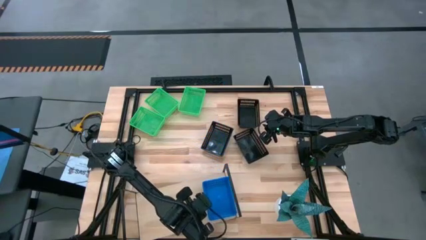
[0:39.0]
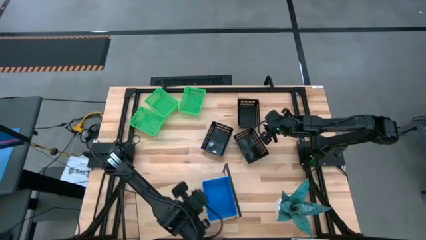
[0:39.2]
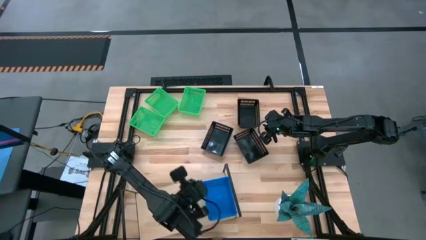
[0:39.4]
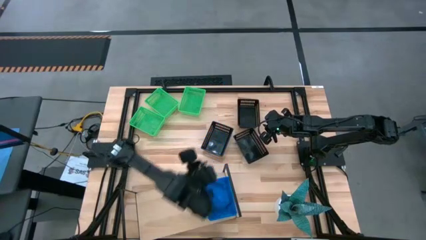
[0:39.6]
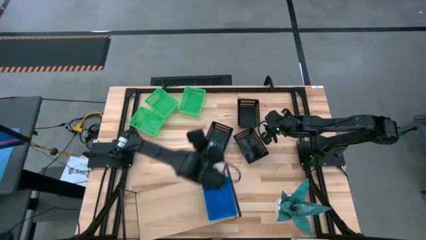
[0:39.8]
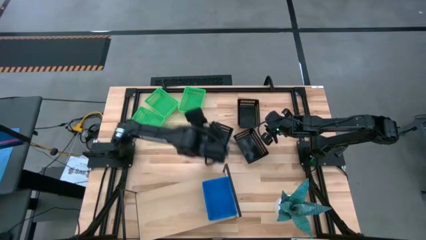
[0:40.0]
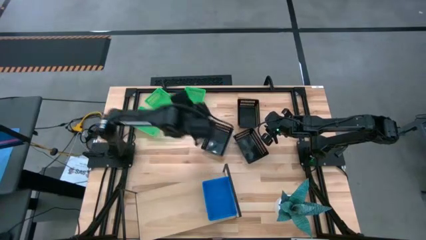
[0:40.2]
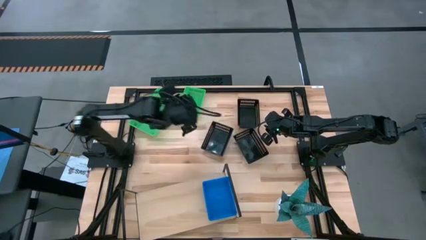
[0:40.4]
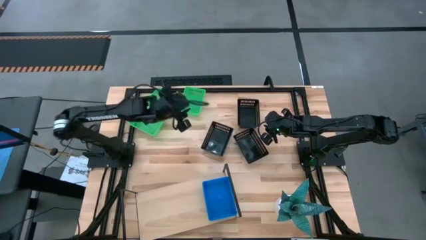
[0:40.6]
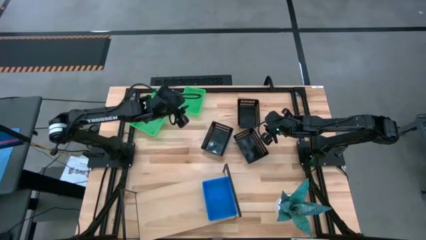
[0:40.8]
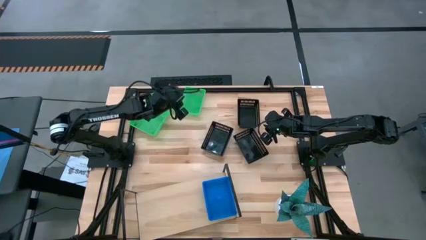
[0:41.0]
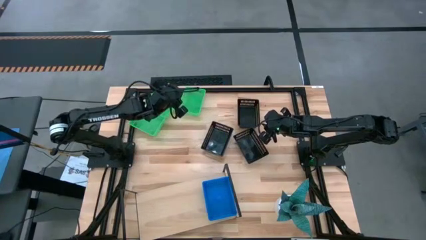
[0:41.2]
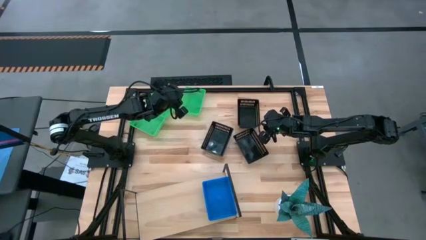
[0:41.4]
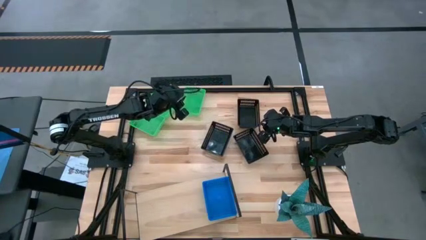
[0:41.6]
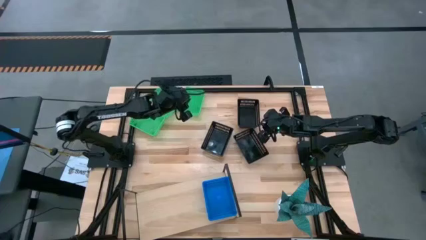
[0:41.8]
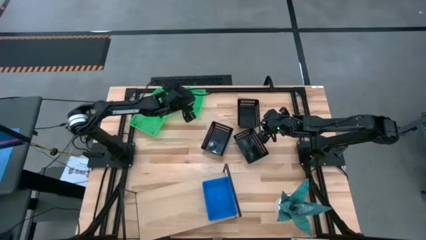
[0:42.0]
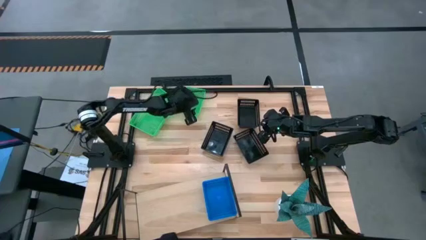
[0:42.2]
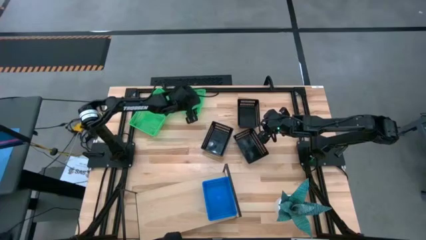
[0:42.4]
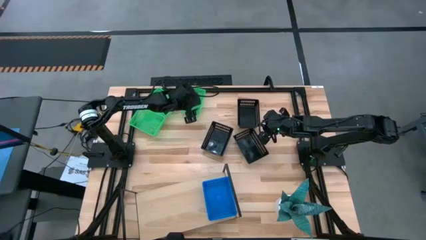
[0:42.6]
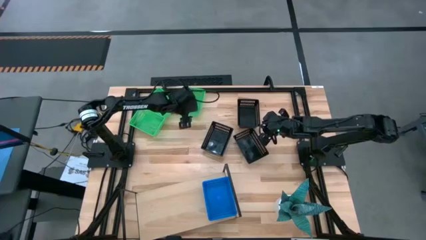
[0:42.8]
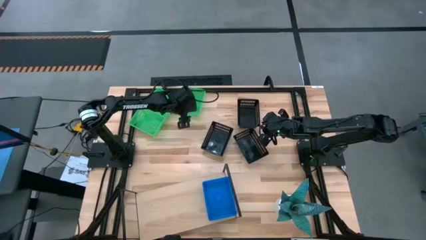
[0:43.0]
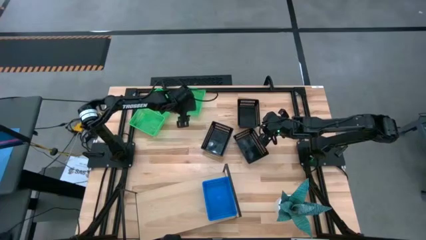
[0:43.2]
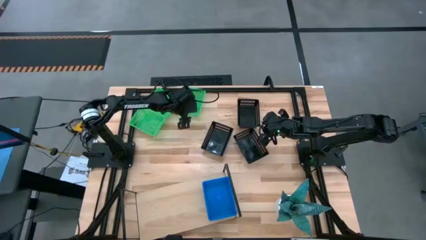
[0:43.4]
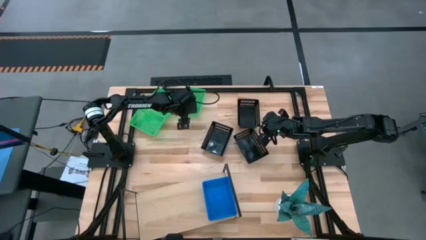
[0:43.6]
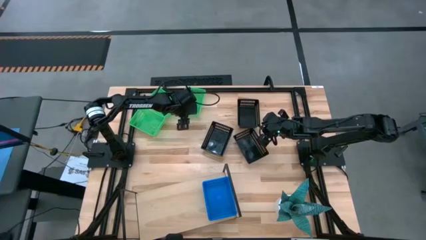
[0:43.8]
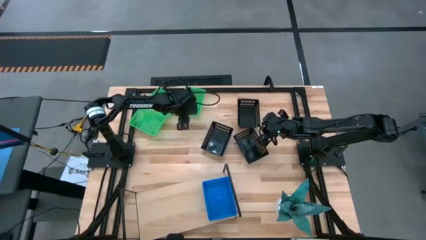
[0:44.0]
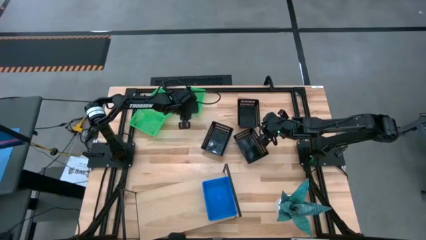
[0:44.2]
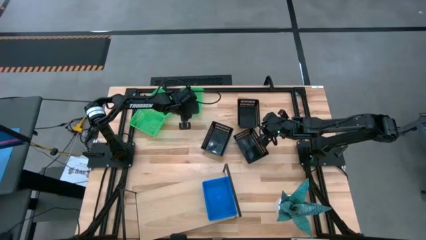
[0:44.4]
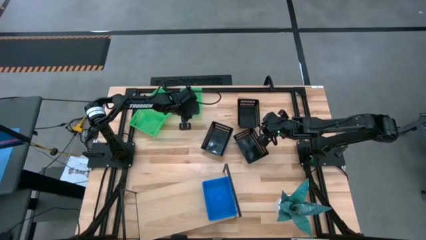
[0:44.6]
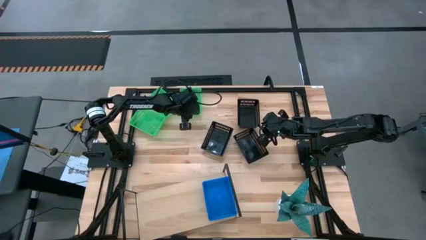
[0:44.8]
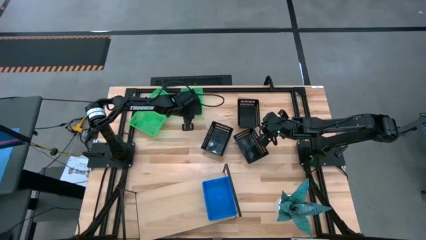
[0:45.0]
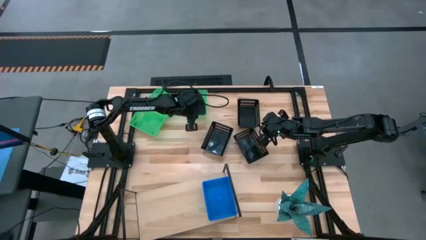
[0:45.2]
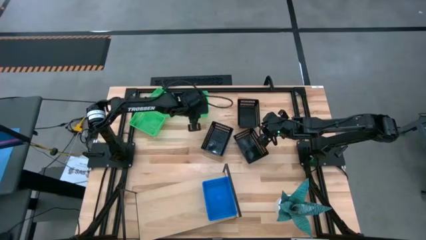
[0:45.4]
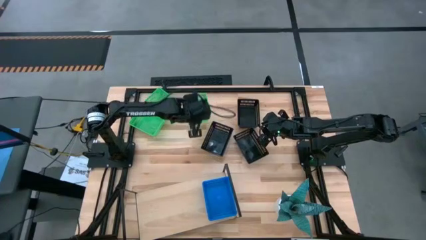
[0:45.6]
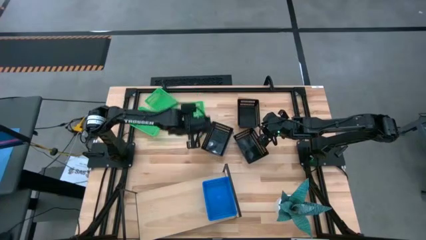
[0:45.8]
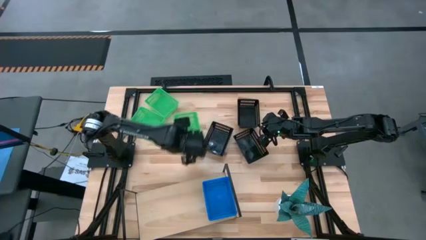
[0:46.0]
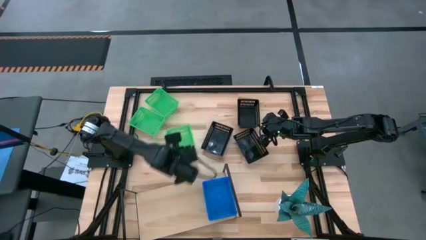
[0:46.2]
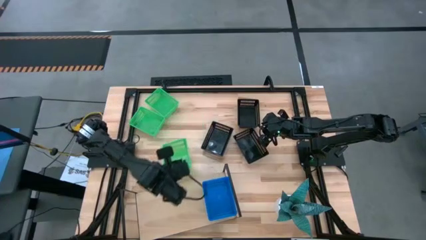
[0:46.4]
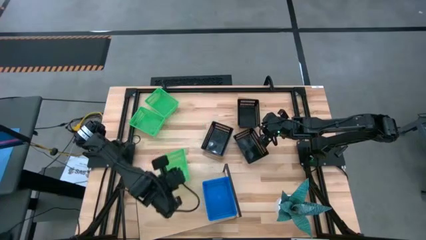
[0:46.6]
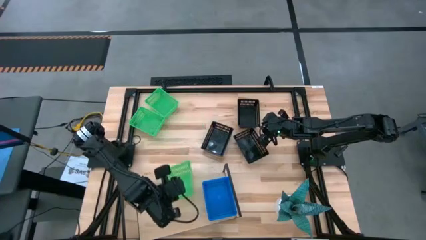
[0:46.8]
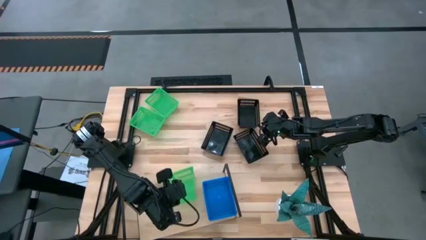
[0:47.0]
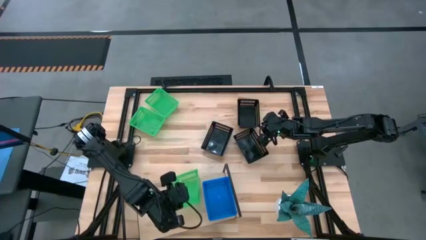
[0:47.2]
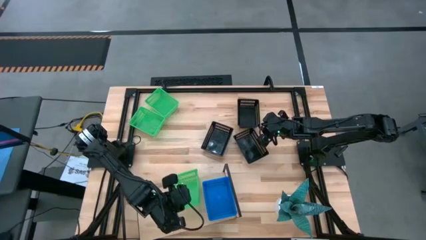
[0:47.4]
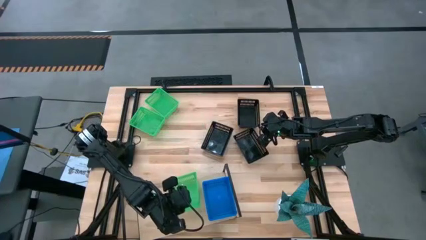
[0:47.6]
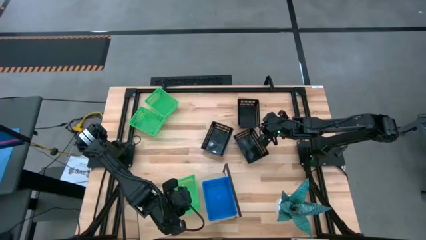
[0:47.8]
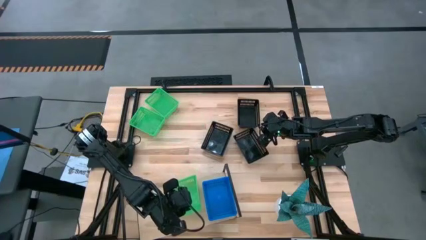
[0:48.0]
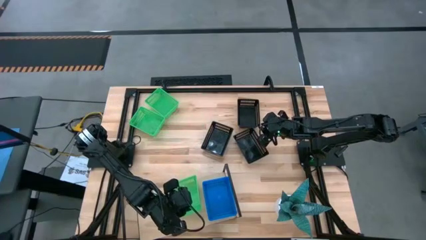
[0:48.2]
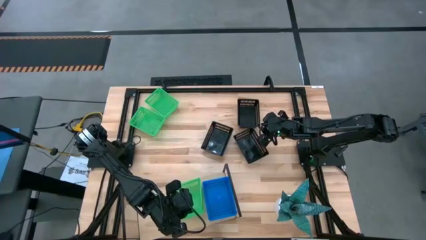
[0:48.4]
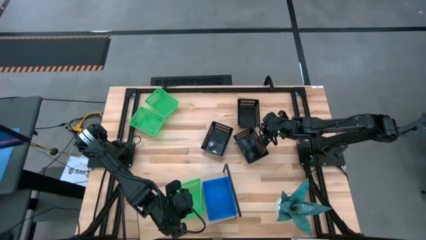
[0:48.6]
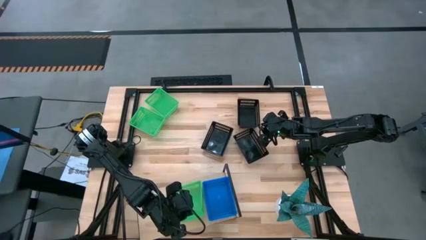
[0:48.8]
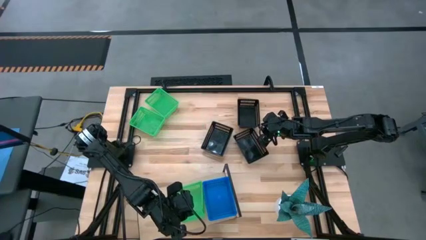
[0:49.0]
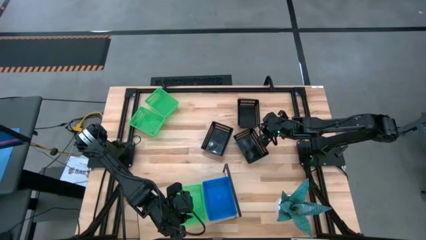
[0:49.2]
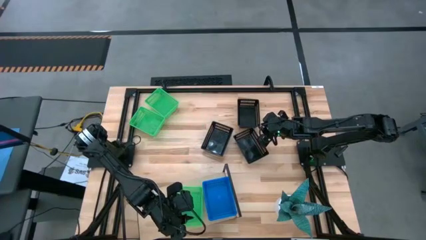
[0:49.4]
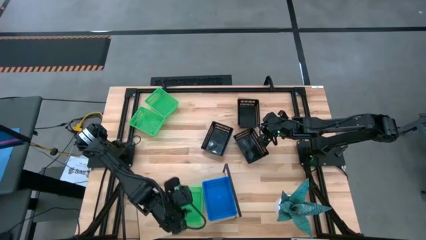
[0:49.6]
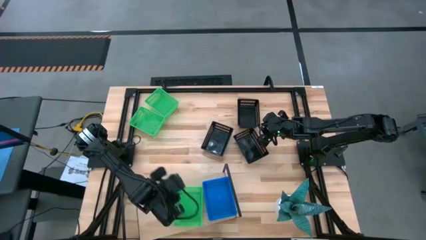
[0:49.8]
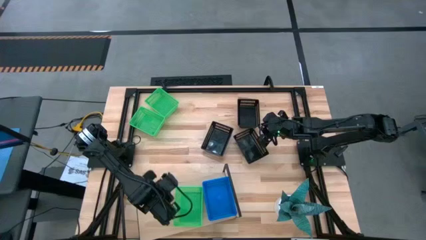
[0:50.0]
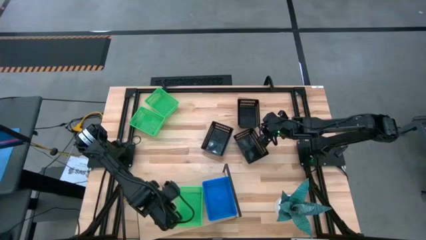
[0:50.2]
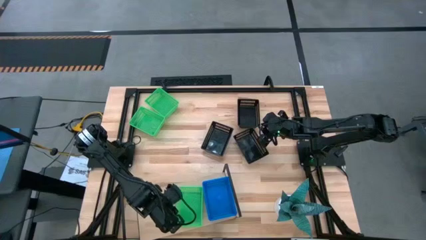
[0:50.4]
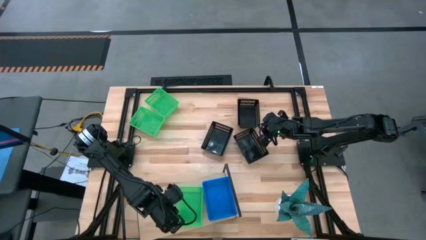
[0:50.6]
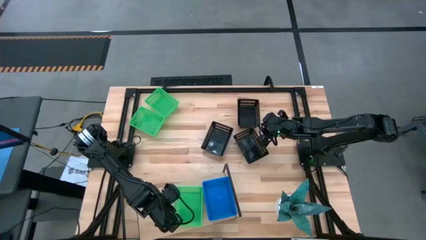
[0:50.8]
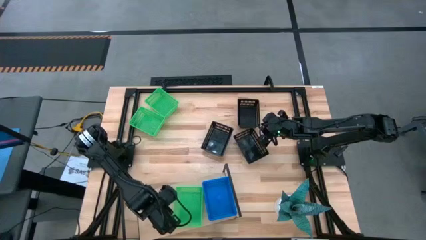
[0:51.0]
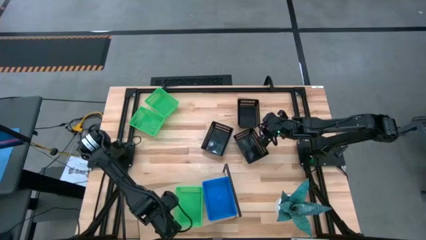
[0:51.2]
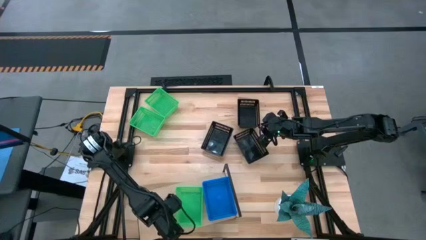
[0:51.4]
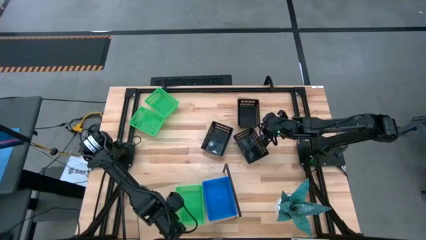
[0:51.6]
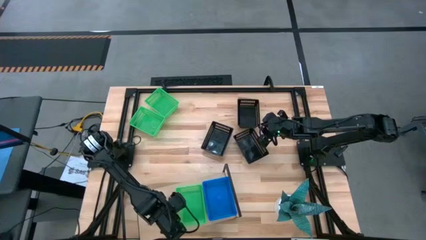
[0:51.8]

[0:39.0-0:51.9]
Task: Stack baskets on shelf by color
Put the top right green basket on the shelf

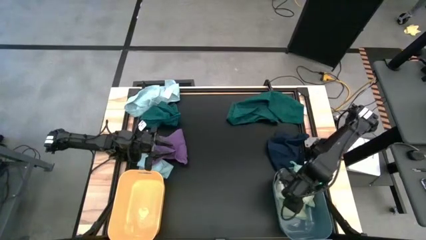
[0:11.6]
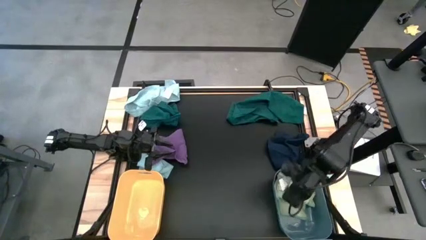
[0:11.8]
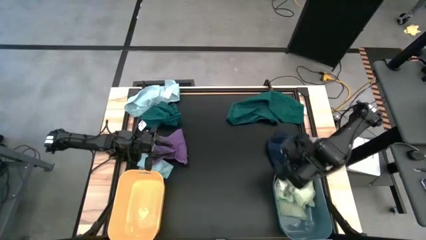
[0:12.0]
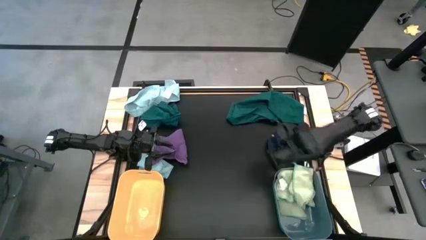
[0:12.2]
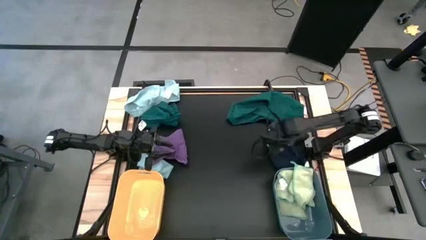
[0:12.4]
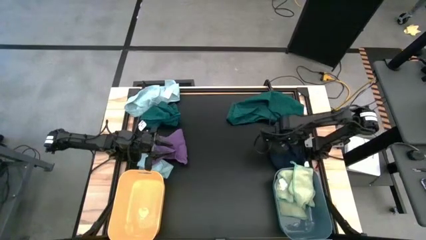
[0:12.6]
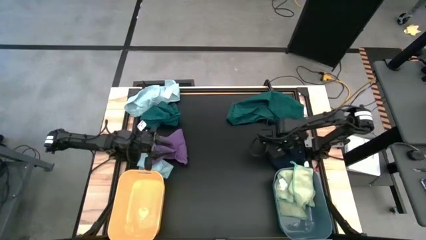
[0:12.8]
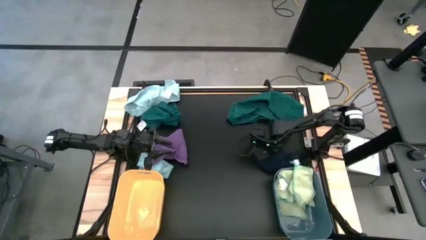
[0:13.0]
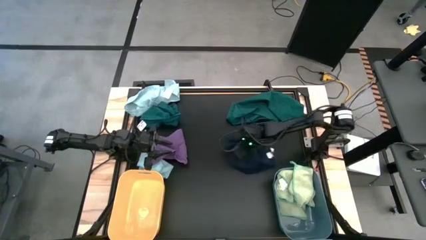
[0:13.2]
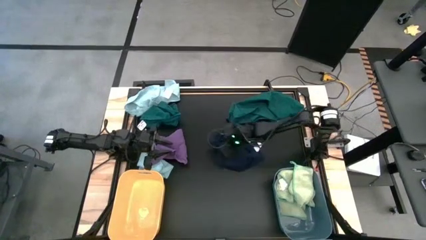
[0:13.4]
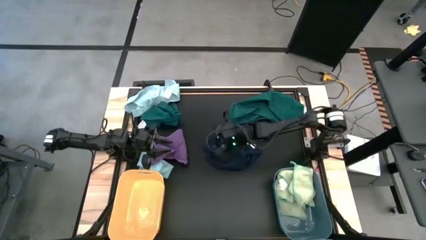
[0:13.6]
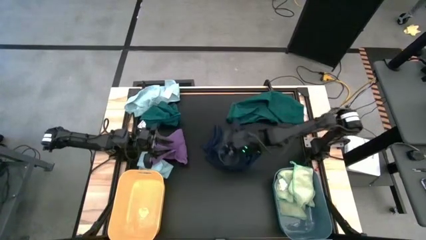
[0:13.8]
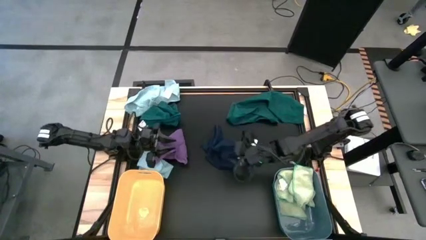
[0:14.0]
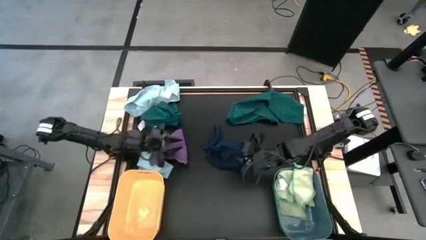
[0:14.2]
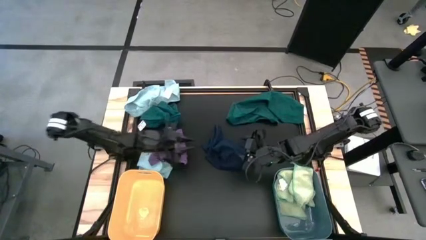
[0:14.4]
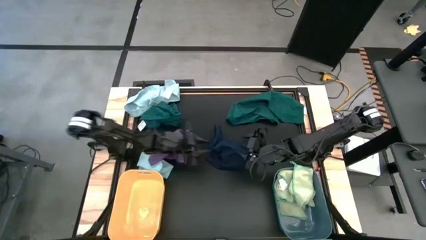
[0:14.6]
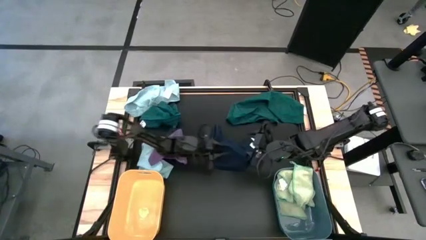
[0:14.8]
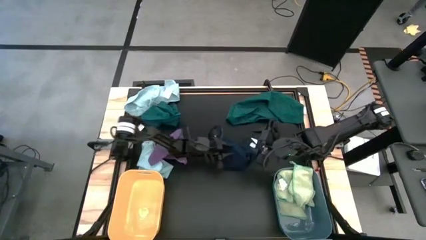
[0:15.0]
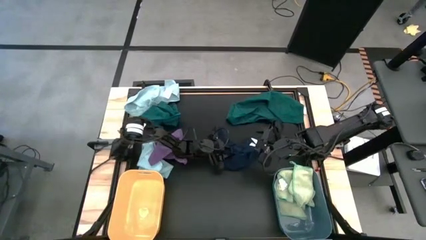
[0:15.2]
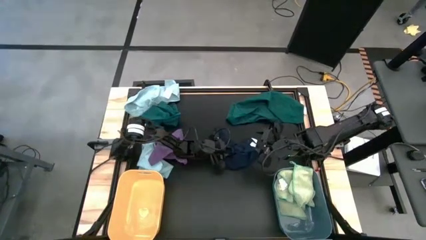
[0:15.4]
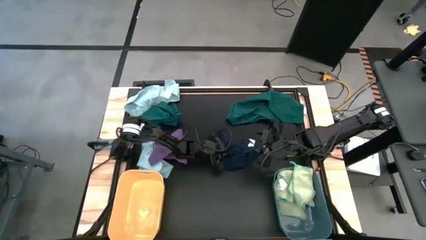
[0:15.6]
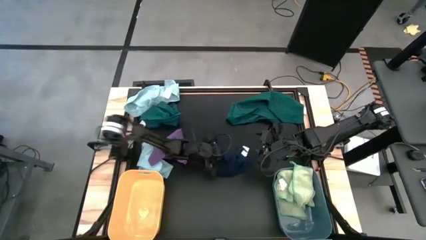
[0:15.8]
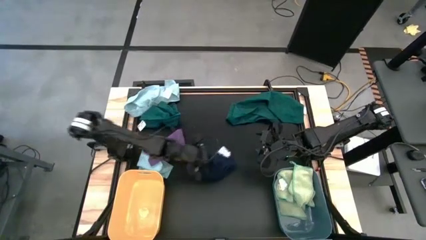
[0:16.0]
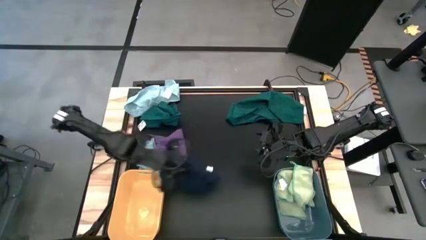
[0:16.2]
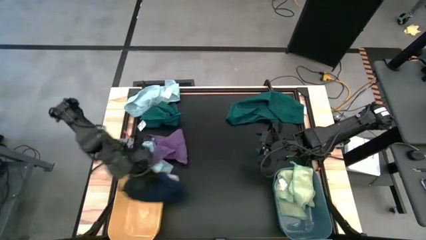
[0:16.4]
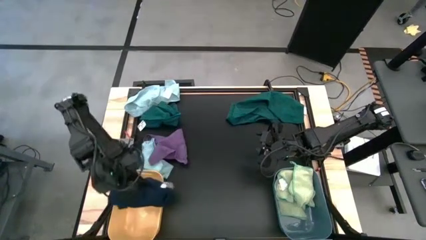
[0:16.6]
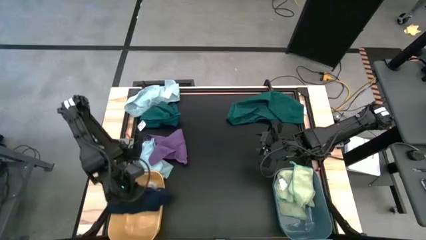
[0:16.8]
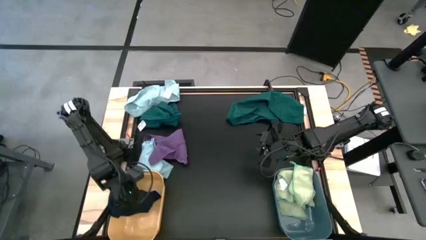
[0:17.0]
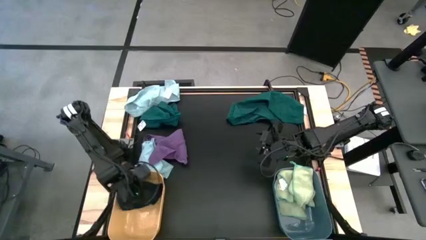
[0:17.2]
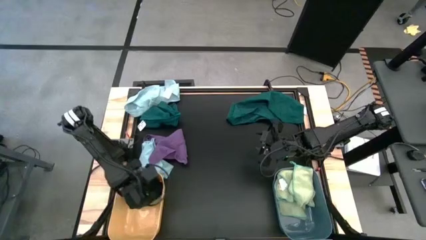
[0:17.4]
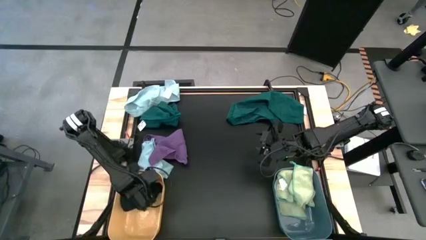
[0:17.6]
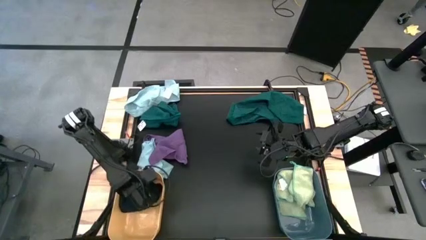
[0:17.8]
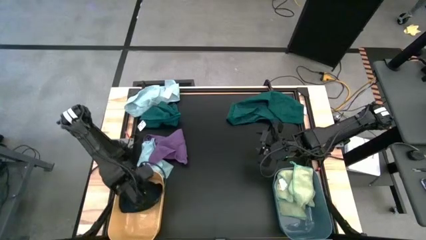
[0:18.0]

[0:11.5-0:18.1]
Task: Sort microfiber towel by color & place in baskets
Put the dark blue microfiber towel into the yellow bin
